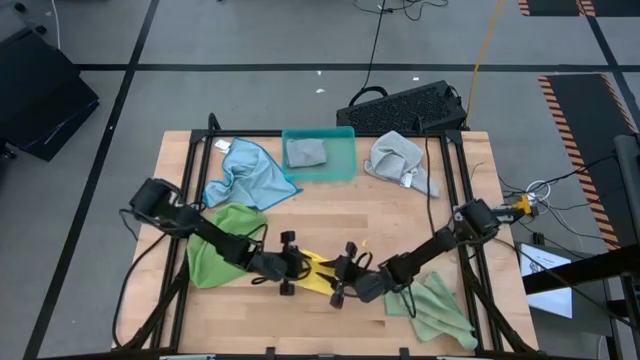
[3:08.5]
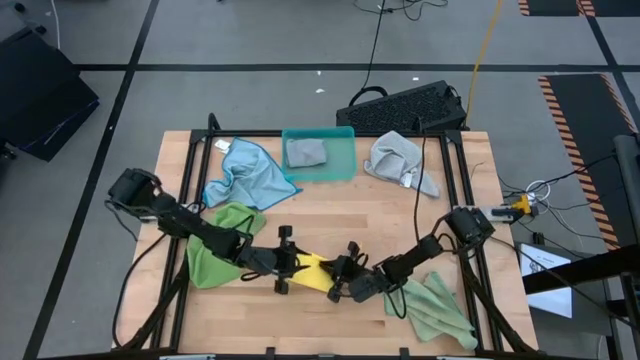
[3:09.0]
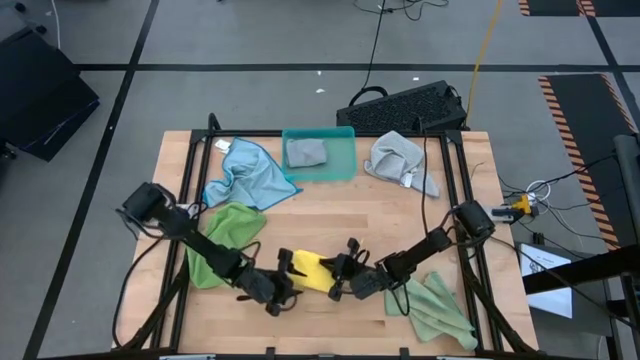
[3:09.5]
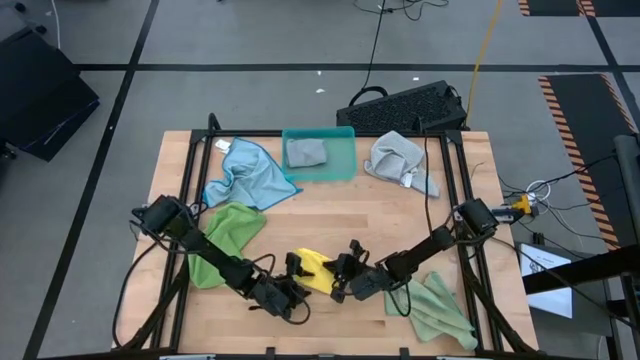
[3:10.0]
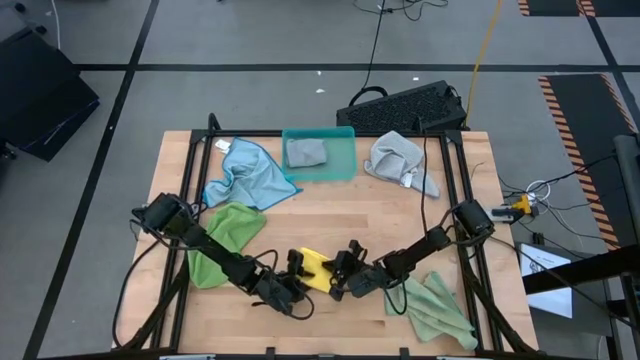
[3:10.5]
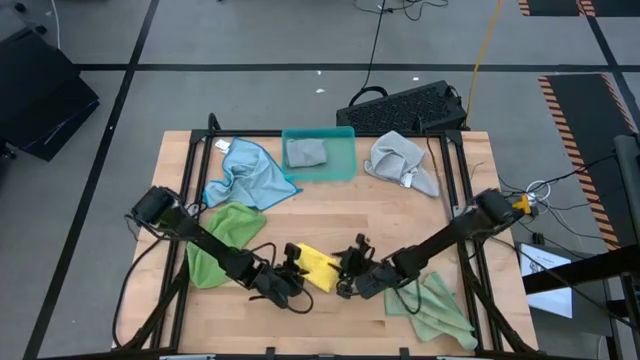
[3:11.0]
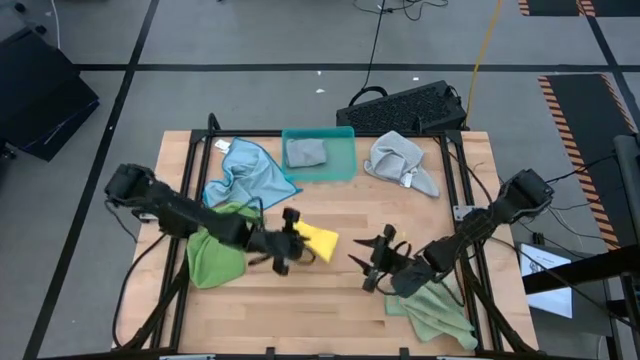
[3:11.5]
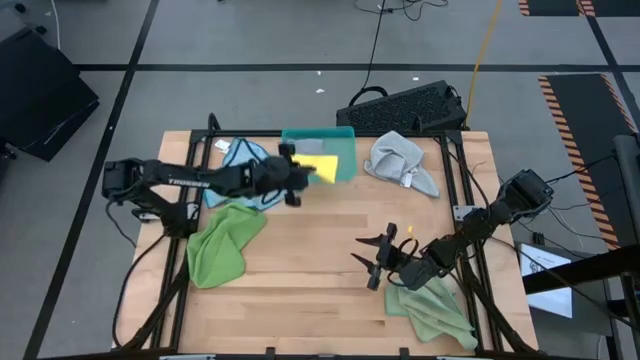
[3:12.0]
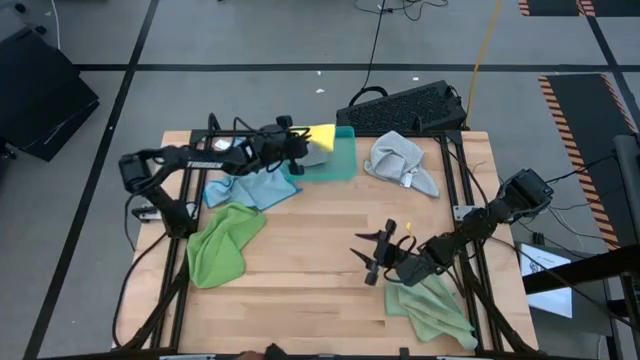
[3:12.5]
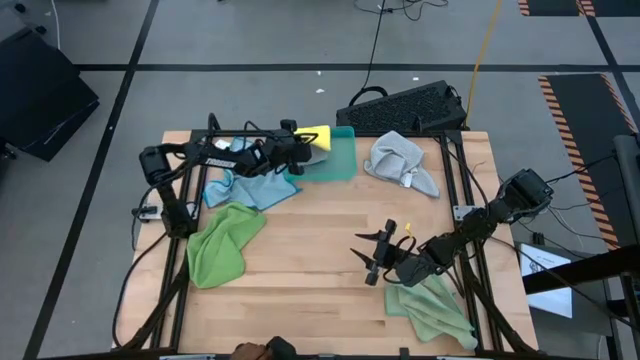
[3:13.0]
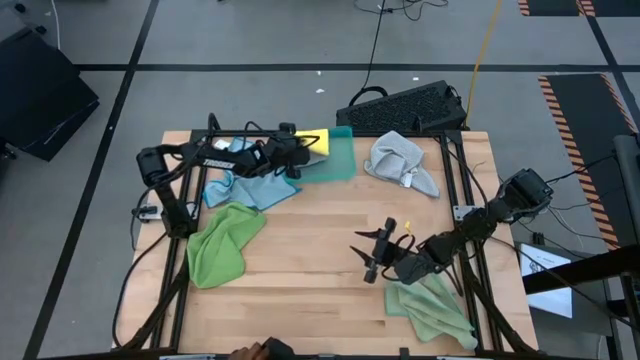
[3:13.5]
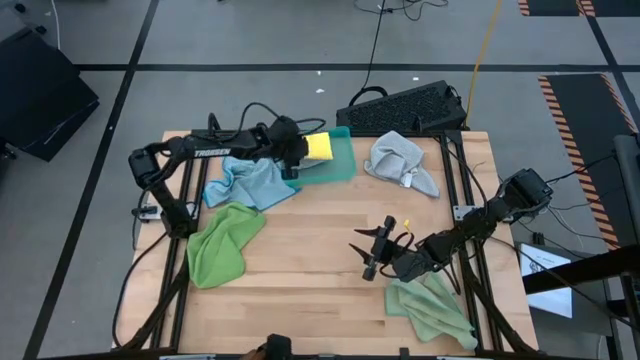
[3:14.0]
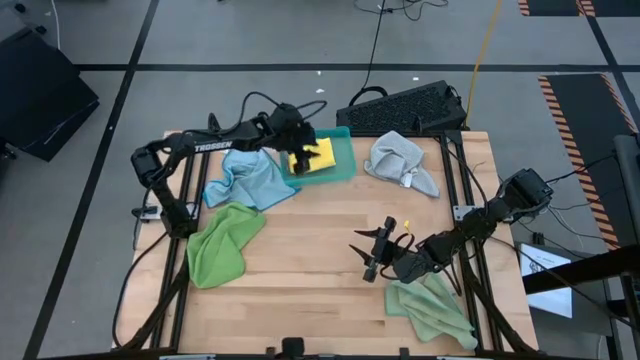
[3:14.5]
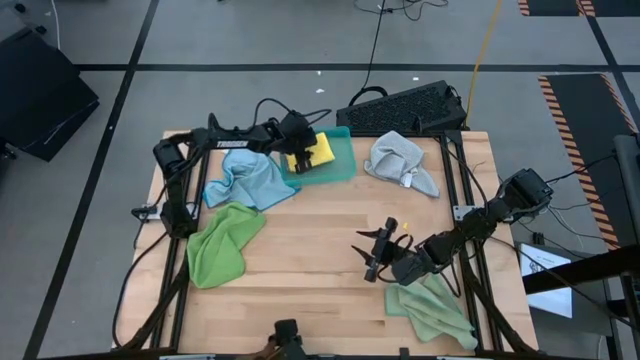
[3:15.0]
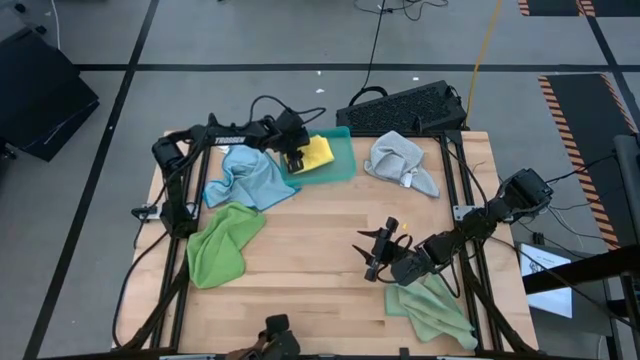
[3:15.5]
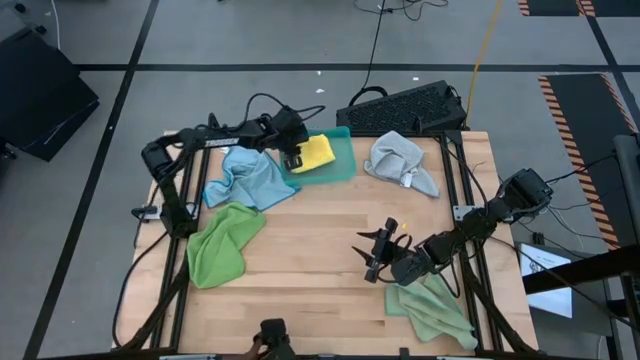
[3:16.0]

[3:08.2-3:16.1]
Task: Fold microfiber towels
Stack the folded yellow microfiber cloth on top of the dark gray microfiber cloth into the green bin

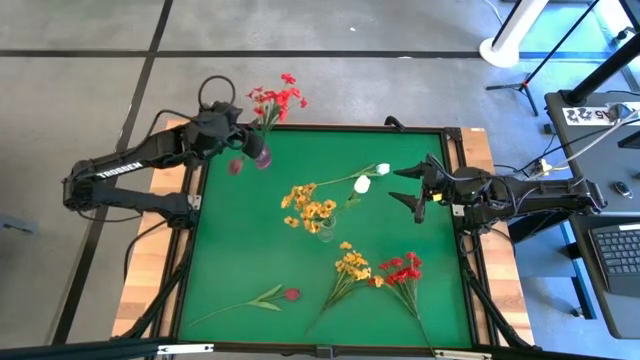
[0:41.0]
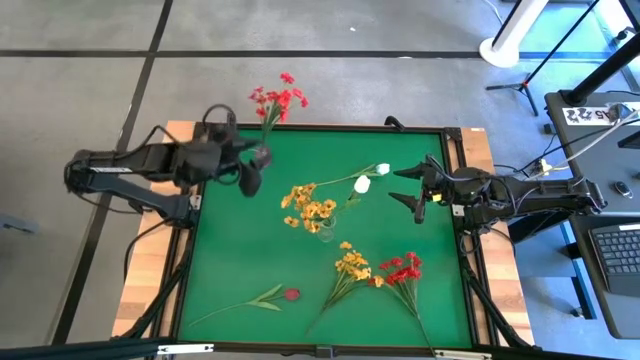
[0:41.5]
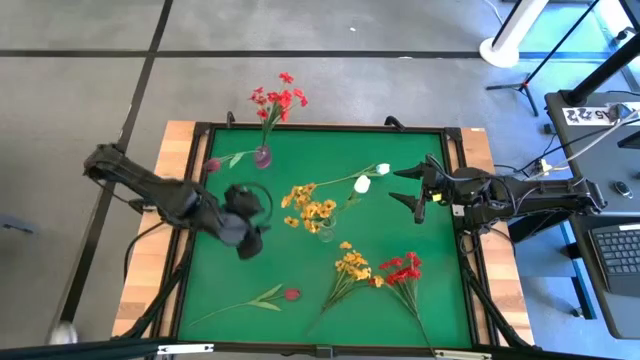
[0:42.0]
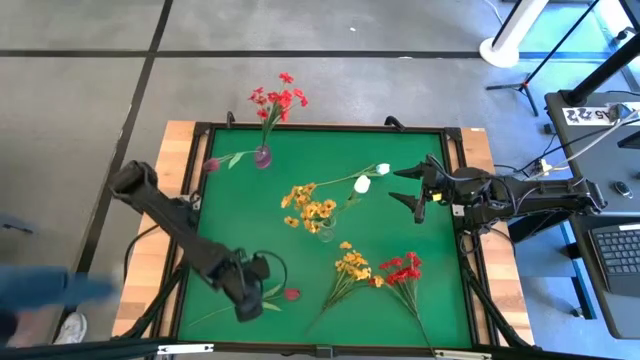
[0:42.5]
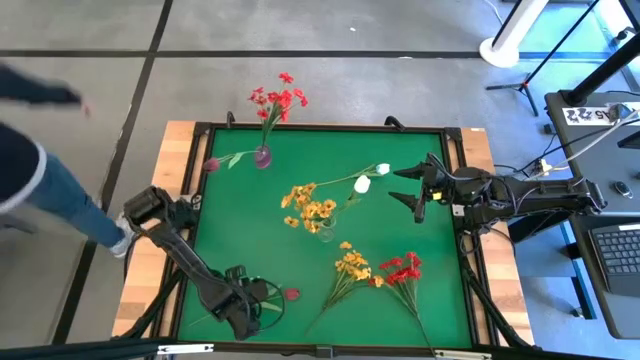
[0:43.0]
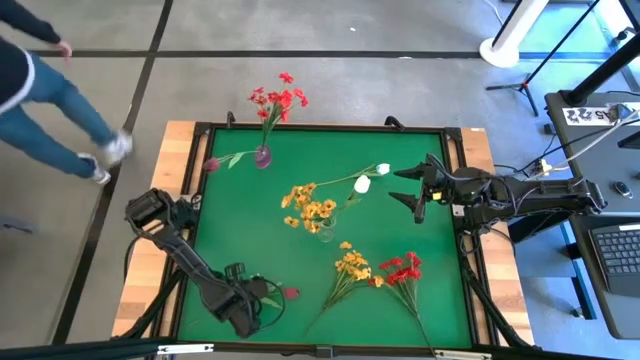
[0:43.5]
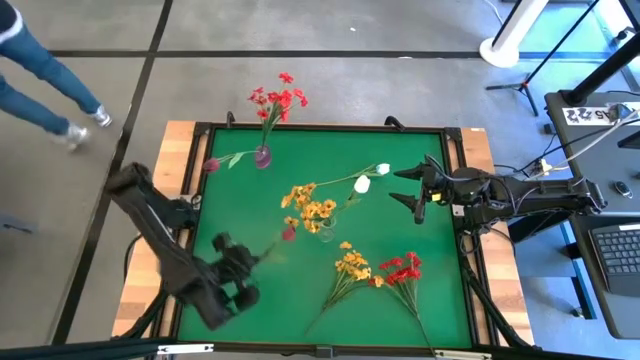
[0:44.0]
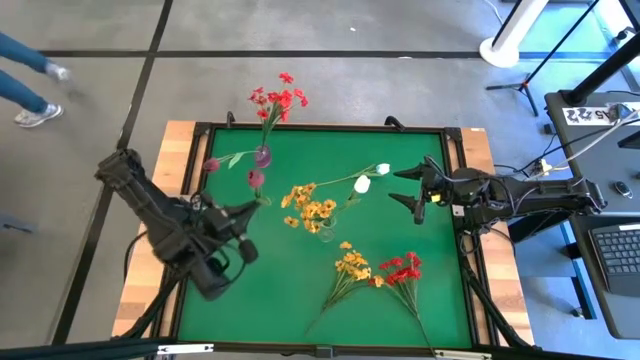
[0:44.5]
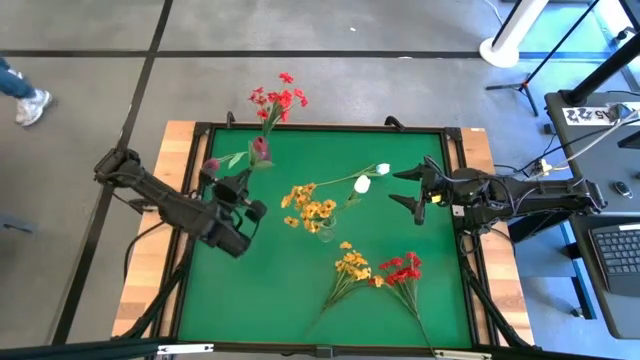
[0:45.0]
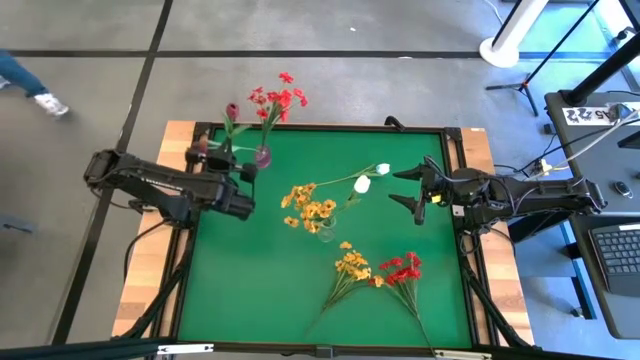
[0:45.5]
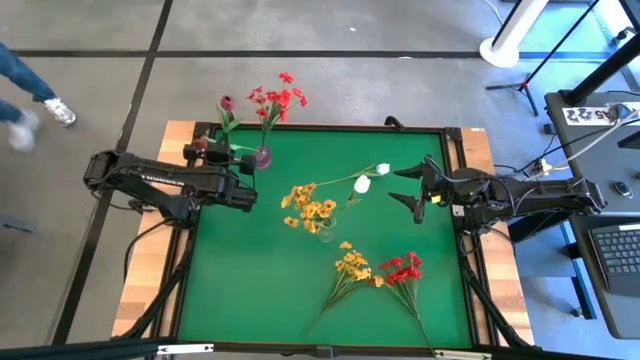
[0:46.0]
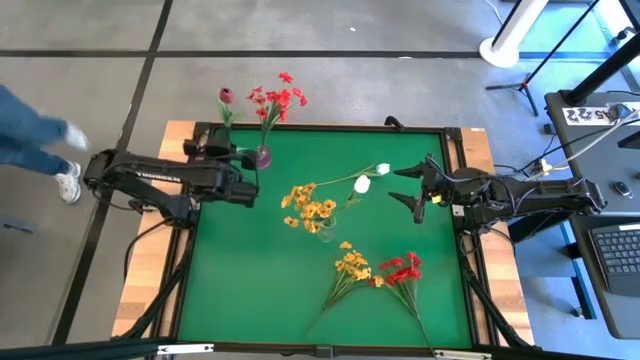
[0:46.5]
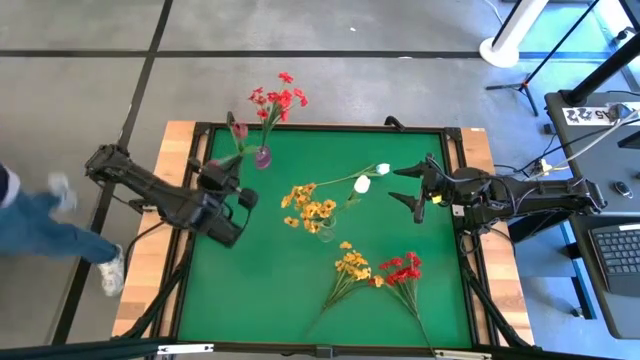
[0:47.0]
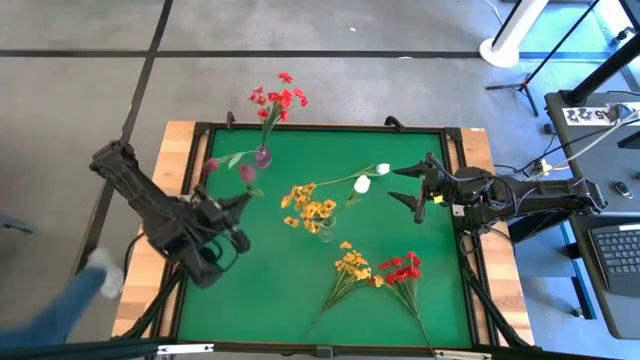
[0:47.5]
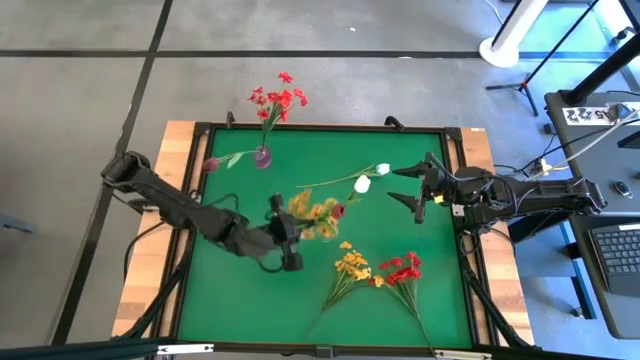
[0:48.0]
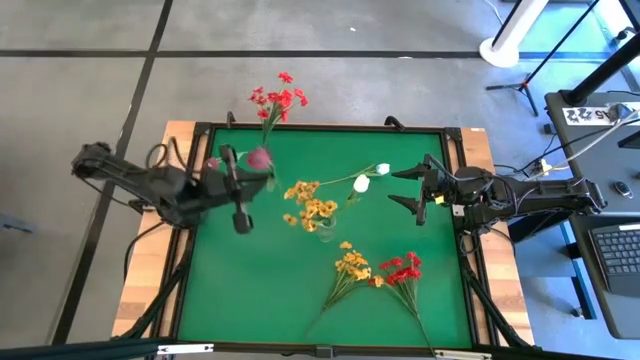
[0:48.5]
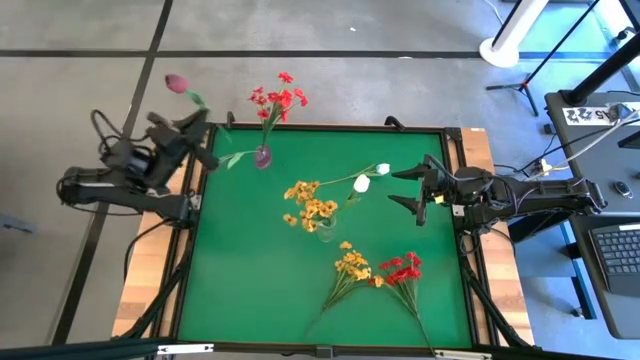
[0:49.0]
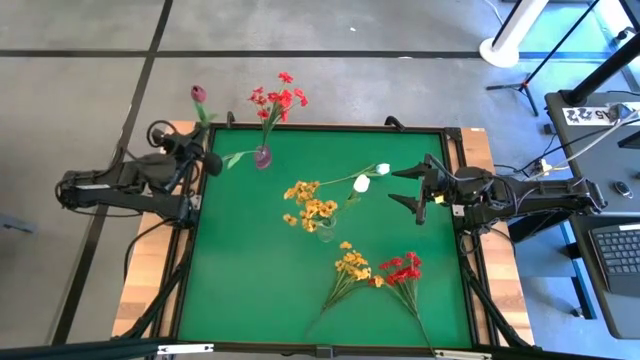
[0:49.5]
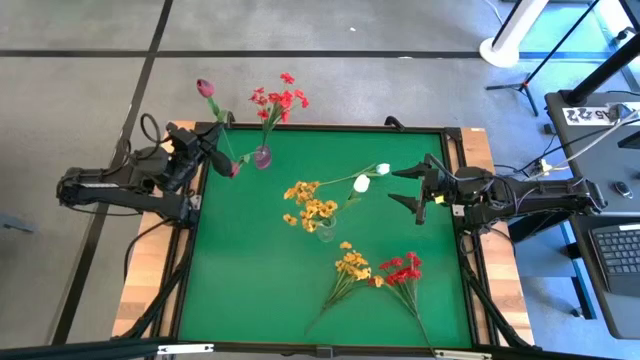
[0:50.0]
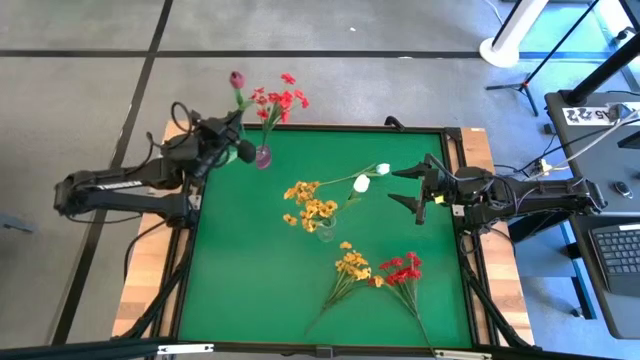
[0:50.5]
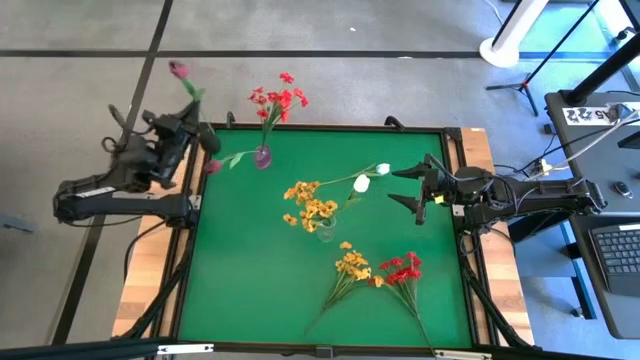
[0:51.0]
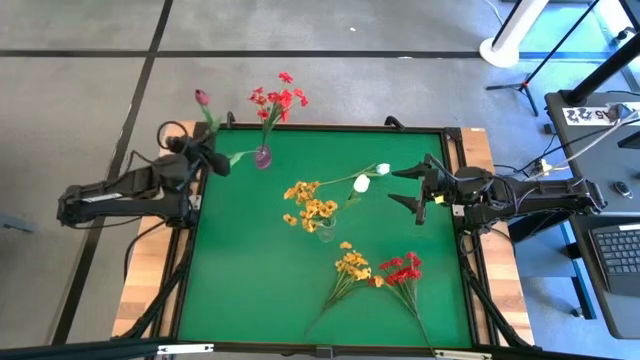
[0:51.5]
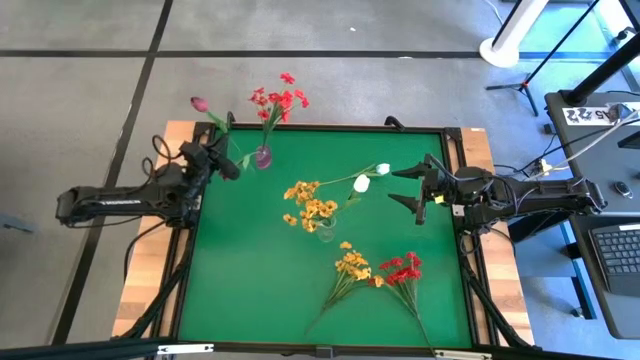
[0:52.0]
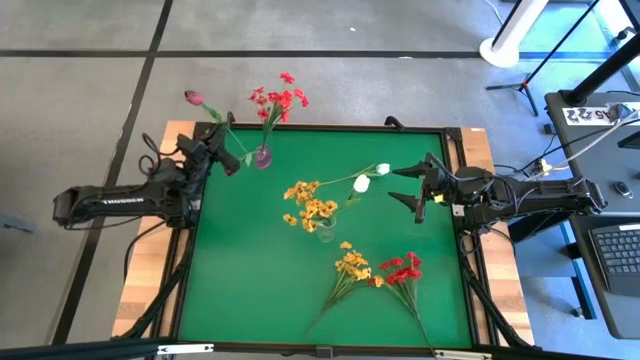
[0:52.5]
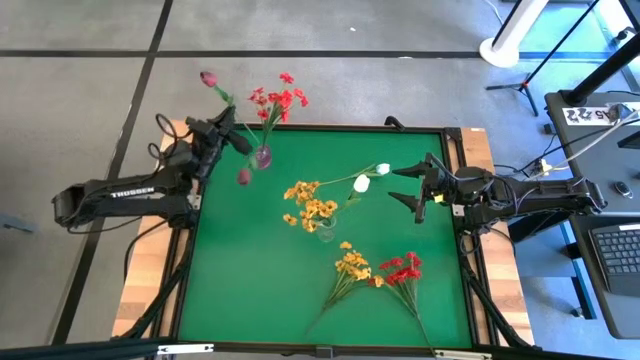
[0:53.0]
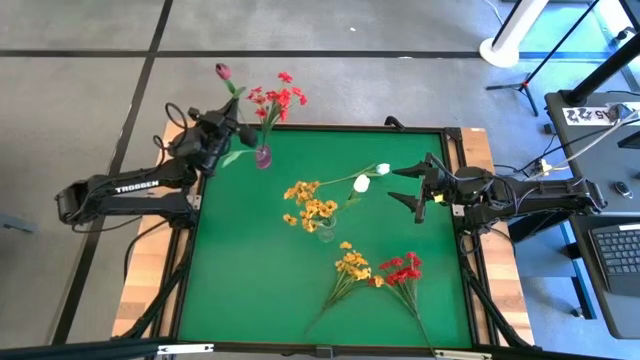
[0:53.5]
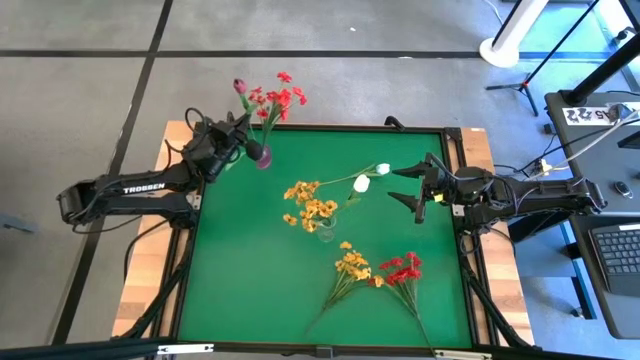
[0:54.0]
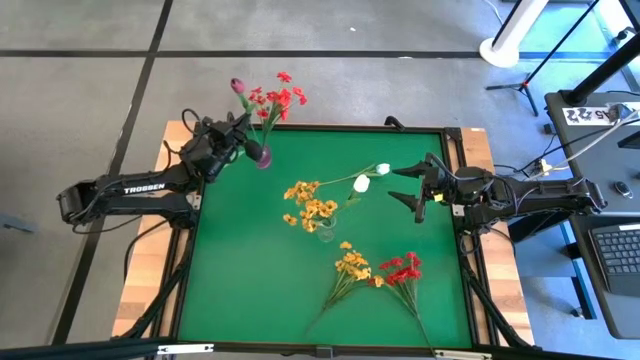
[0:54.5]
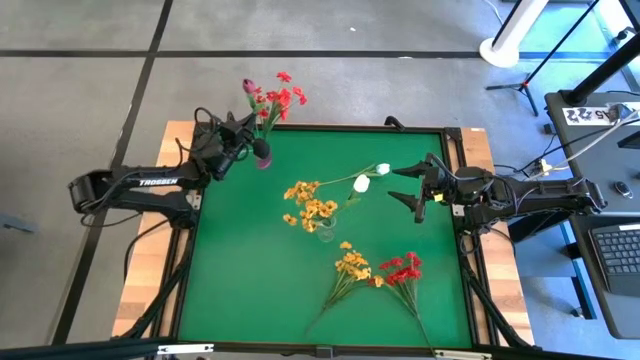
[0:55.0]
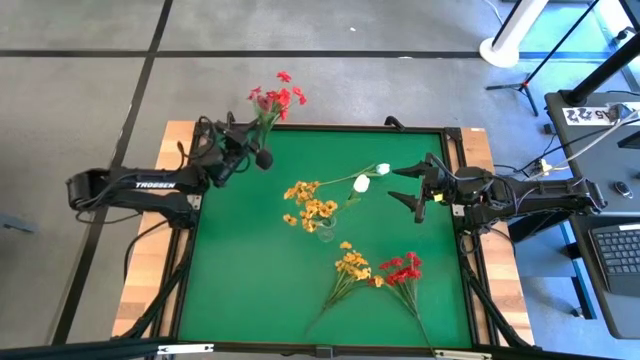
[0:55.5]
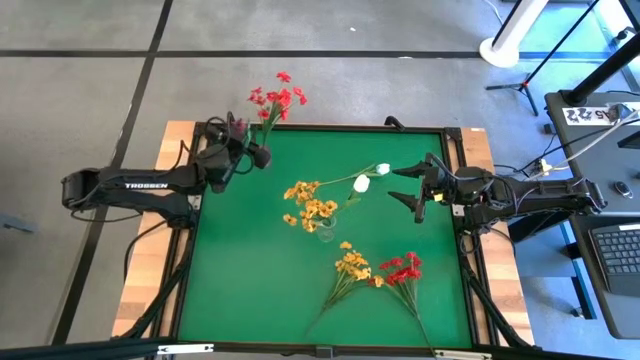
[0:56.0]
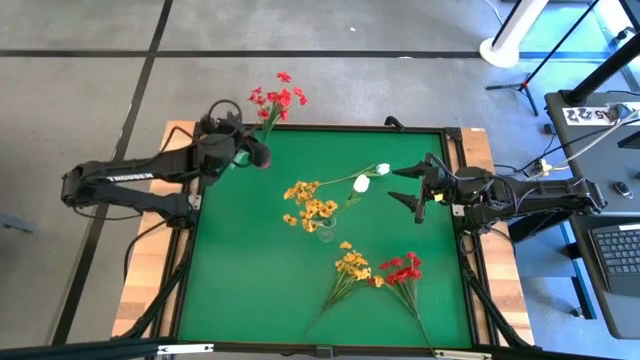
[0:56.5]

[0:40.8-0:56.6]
Task: Sort flowers into vase by color
Put the red flower into the violet vase
